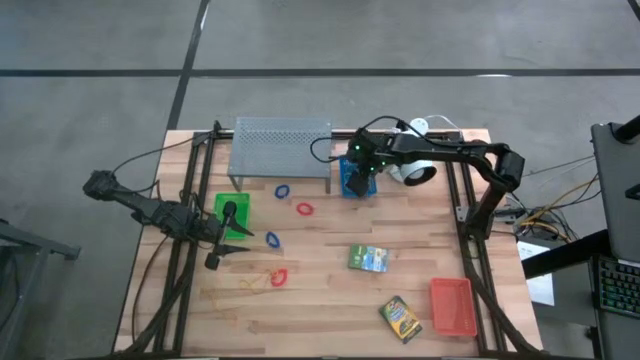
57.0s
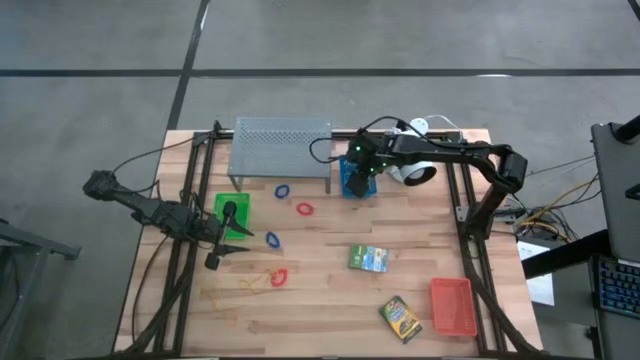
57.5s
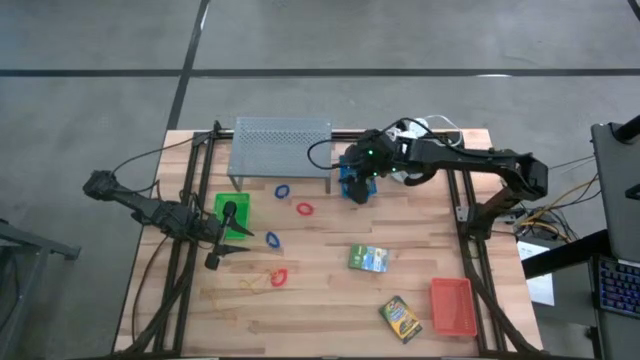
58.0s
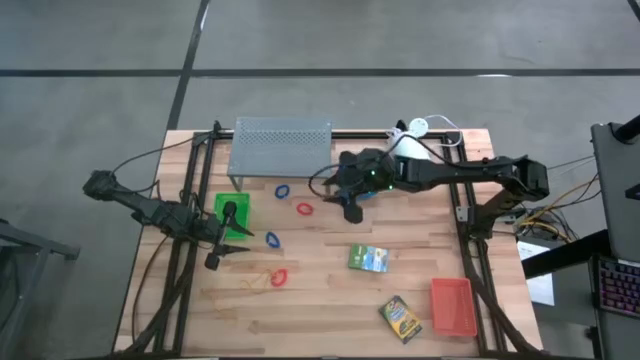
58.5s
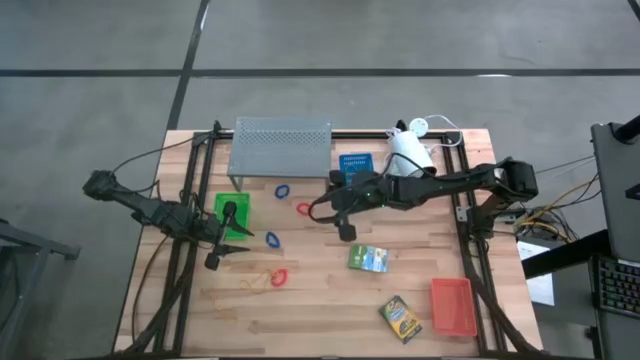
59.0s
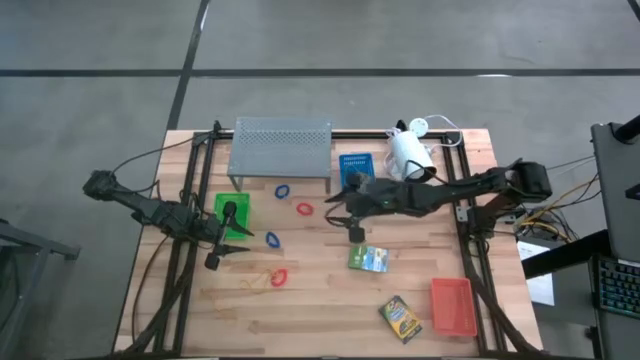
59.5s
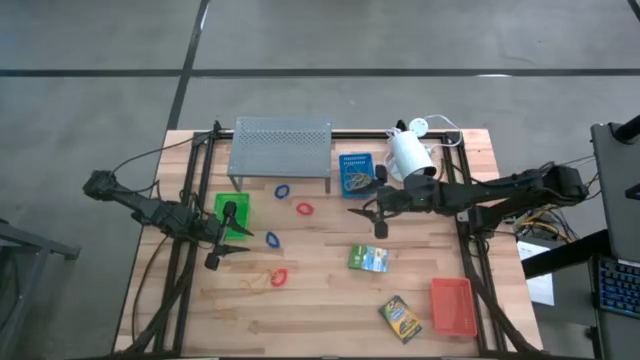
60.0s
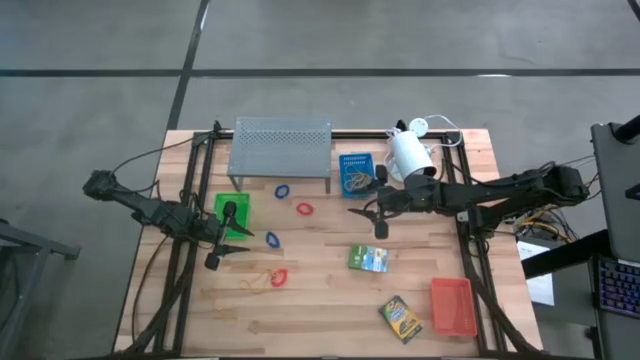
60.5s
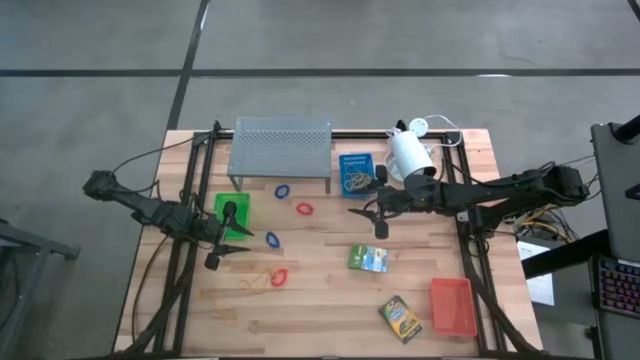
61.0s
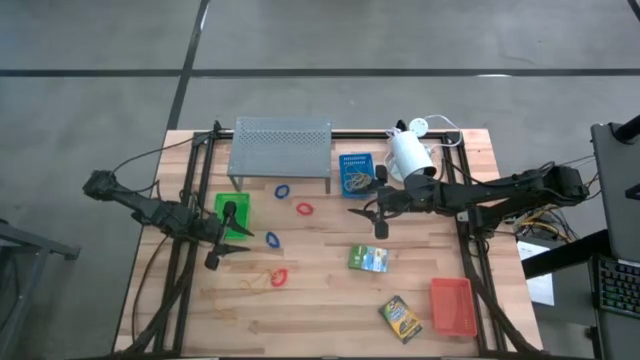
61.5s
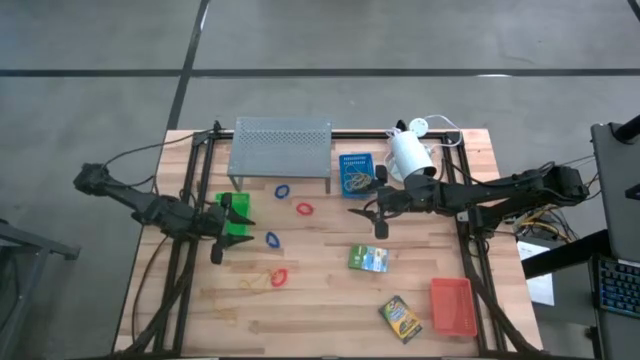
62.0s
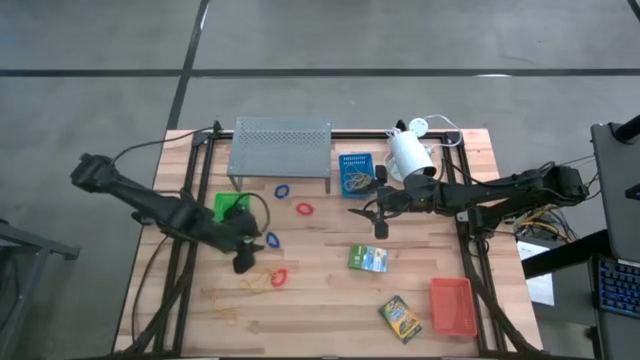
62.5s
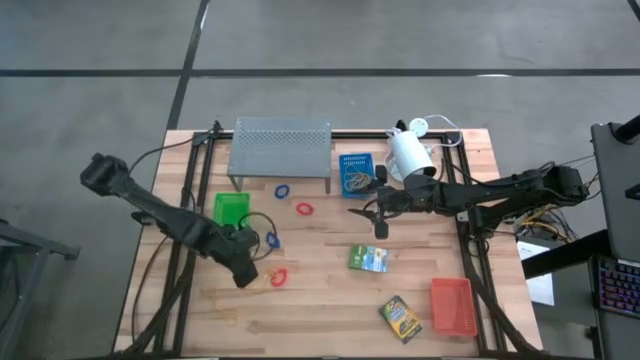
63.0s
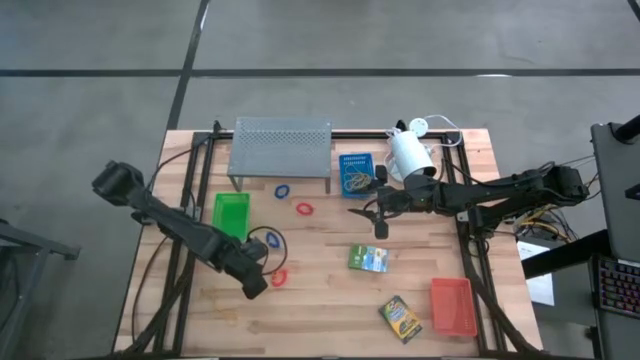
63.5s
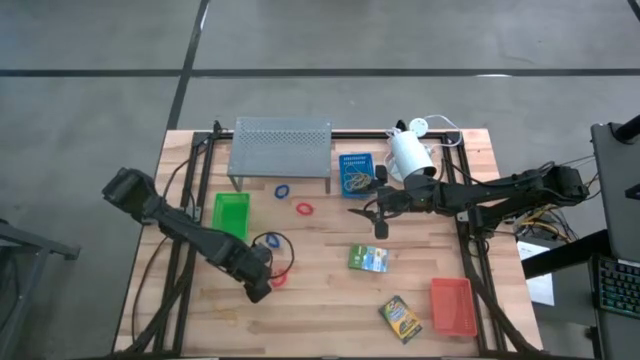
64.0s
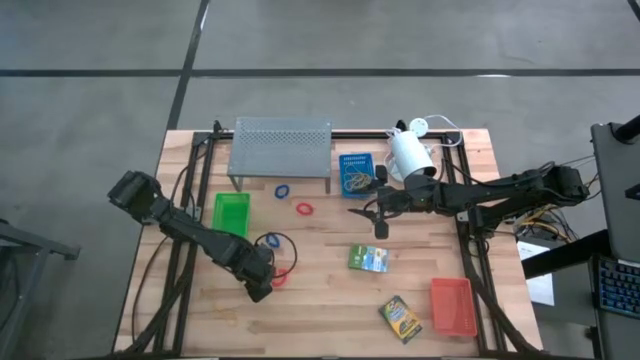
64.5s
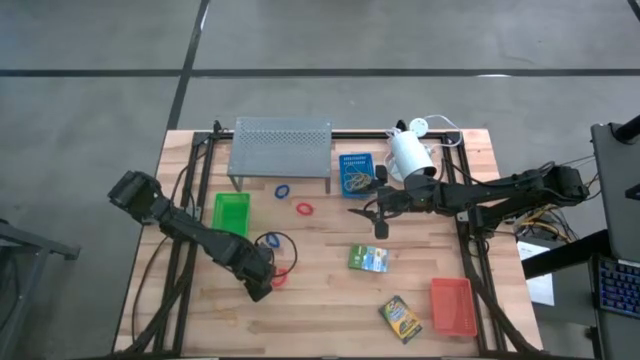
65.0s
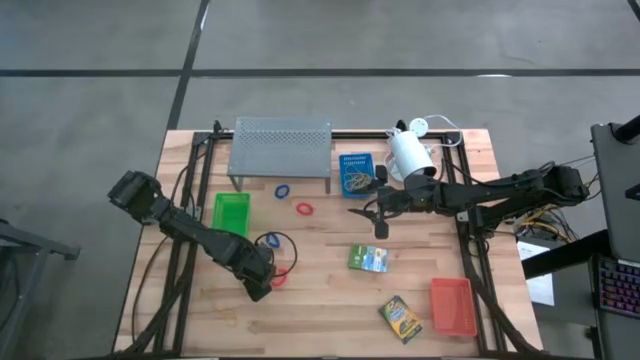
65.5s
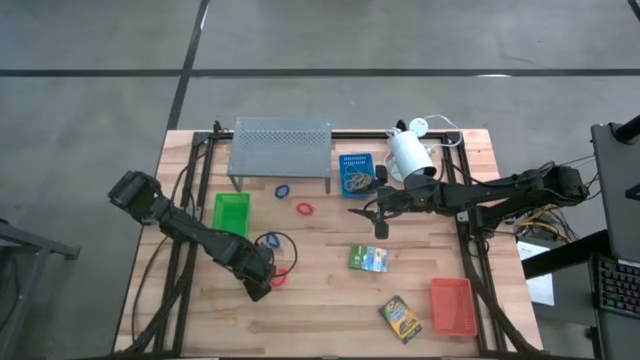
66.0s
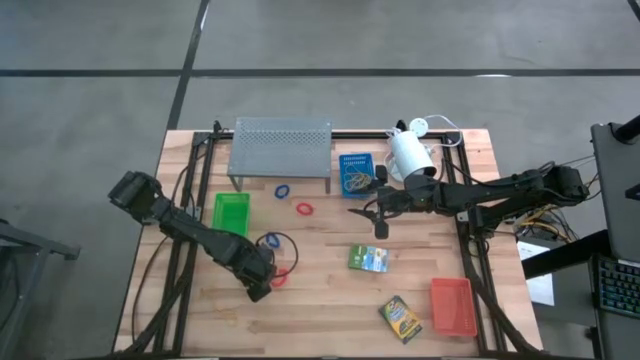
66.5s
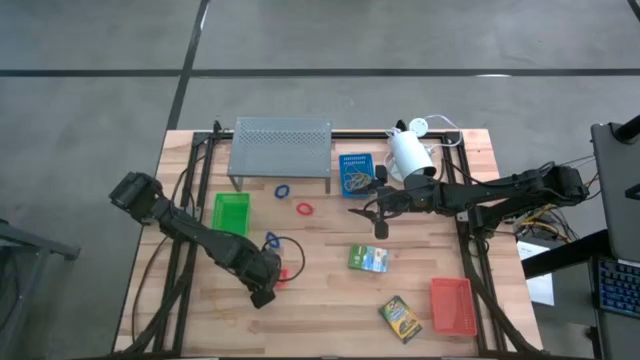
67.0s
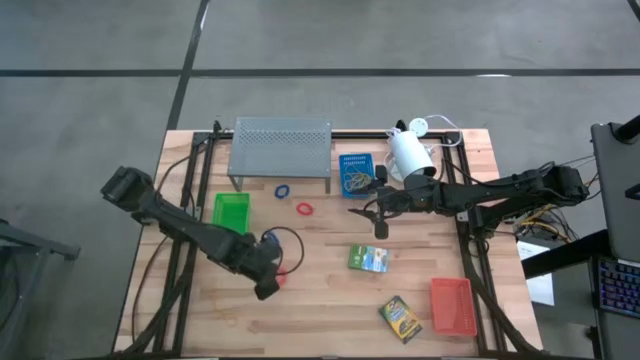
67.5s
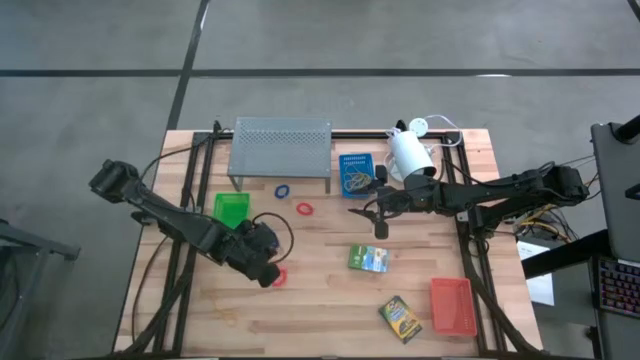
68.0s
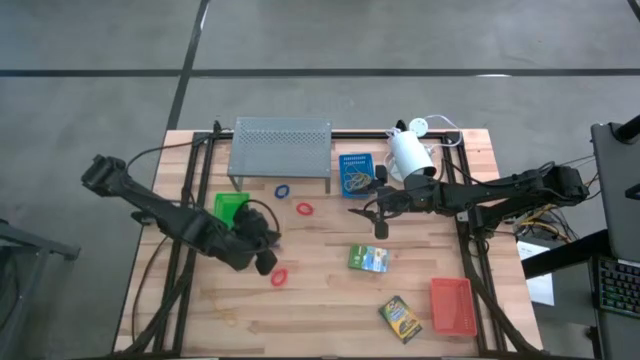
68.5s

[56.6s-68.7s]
Task: Pick & Place Office Desk Supplies
Put the yellow rubber band into the blue bin

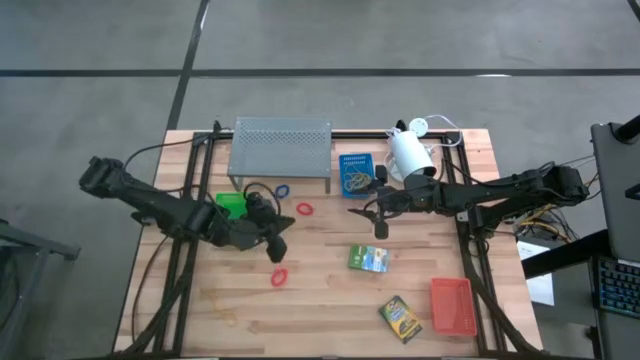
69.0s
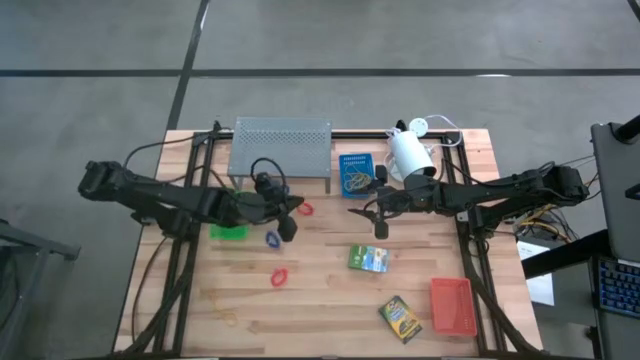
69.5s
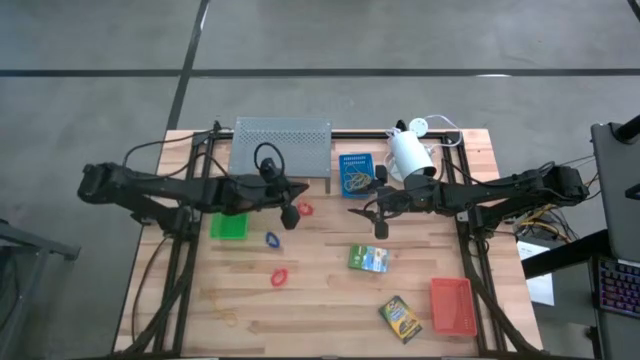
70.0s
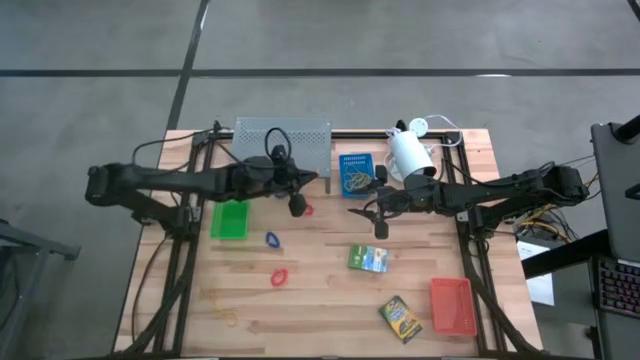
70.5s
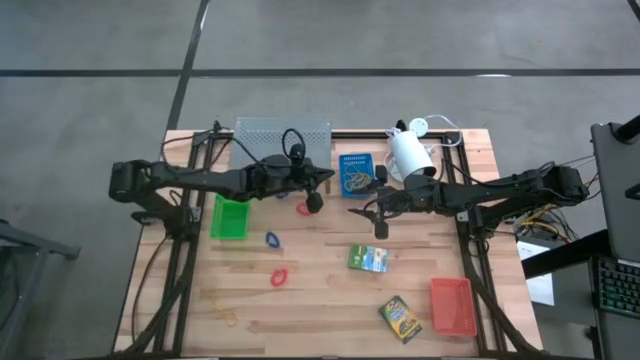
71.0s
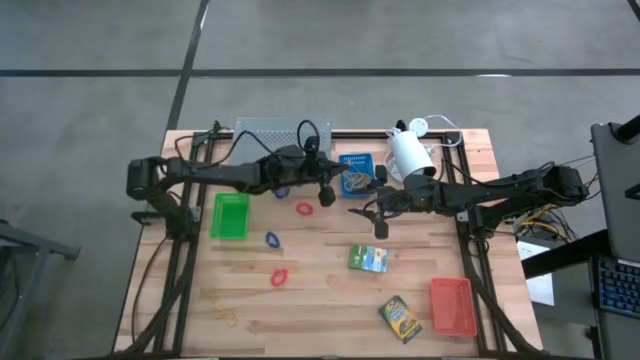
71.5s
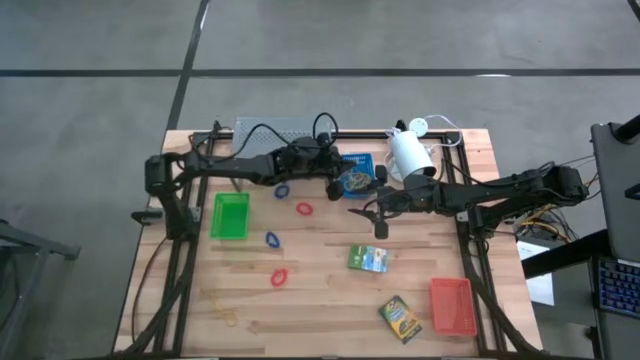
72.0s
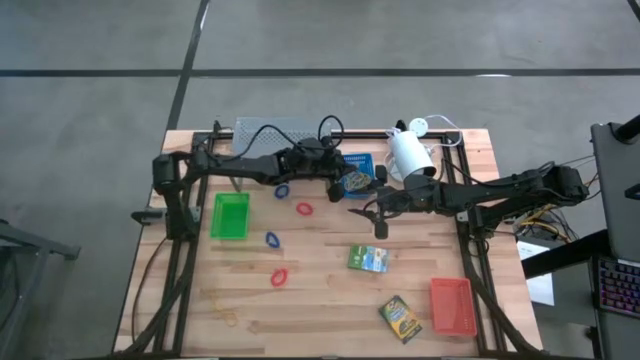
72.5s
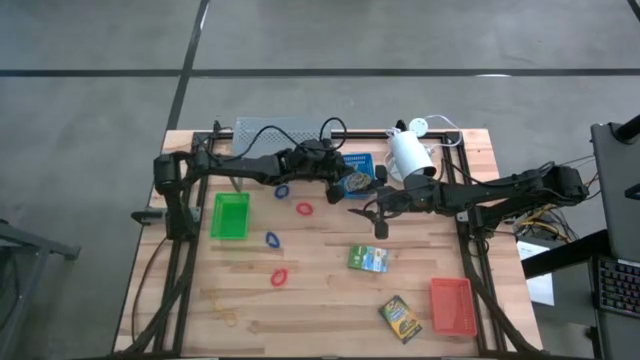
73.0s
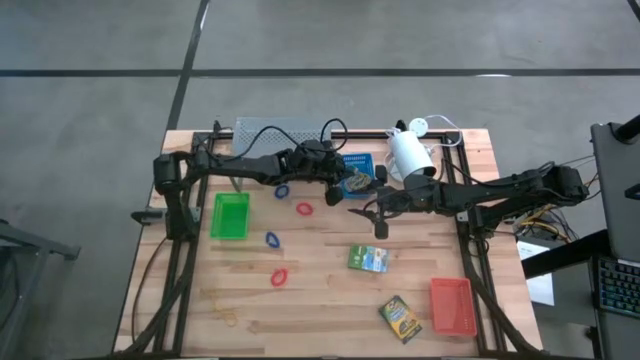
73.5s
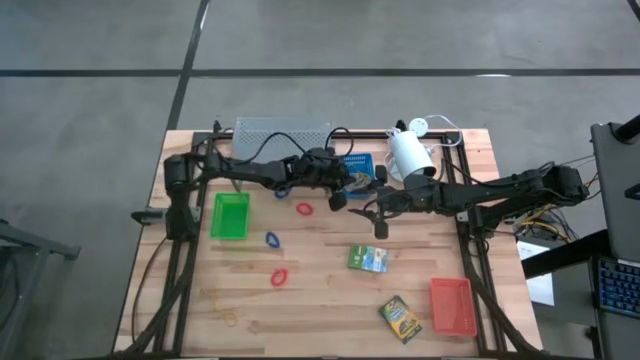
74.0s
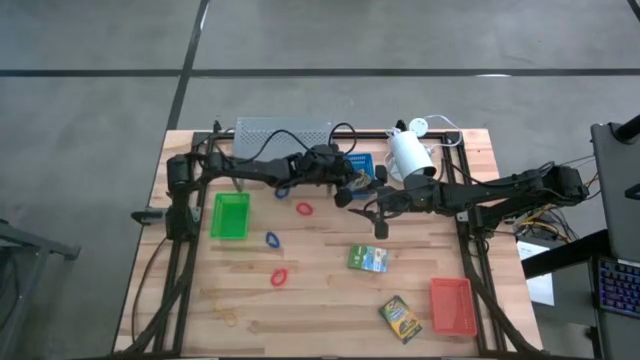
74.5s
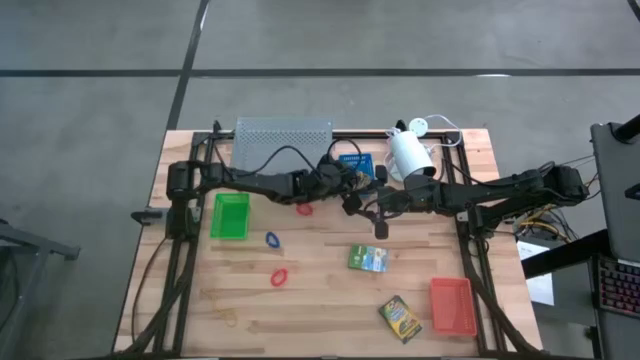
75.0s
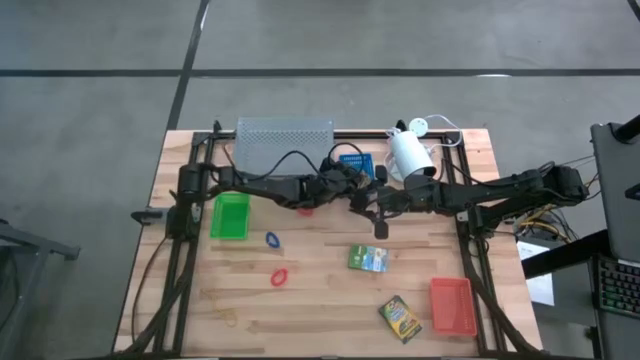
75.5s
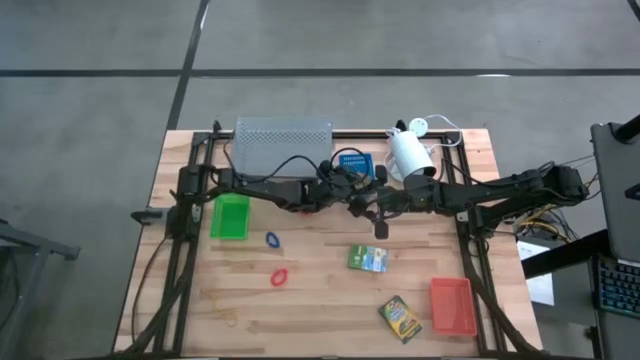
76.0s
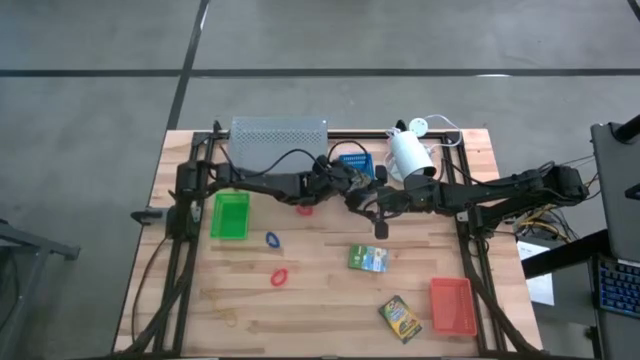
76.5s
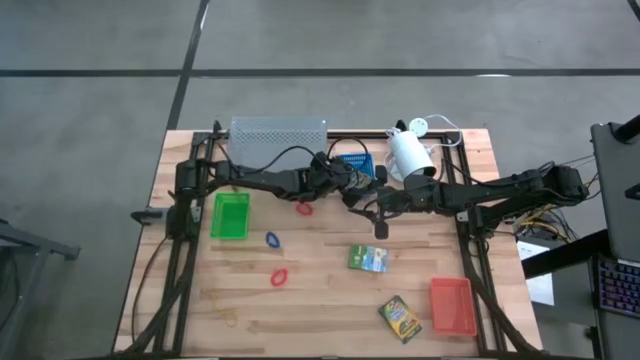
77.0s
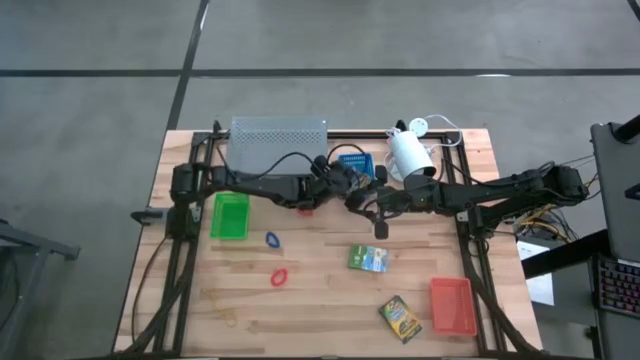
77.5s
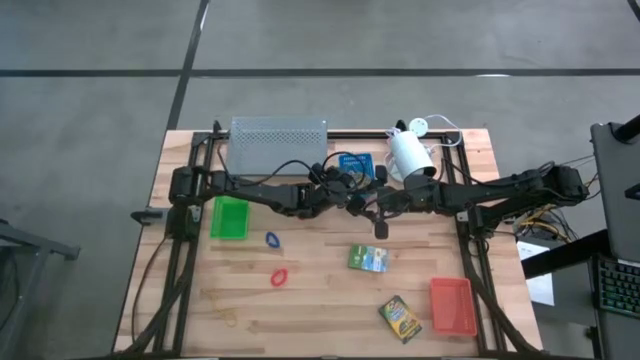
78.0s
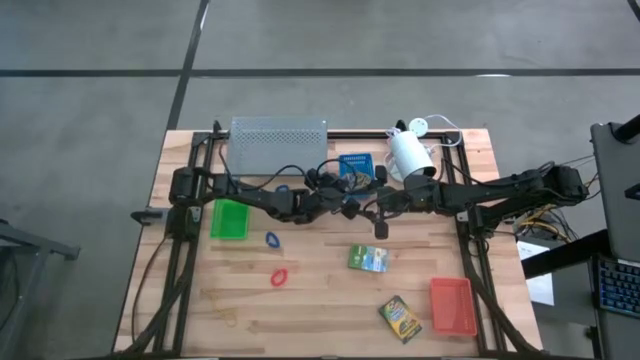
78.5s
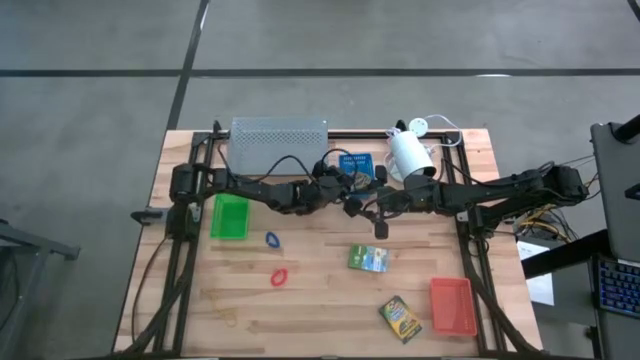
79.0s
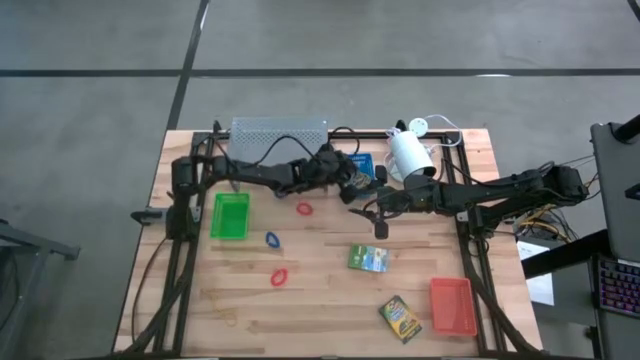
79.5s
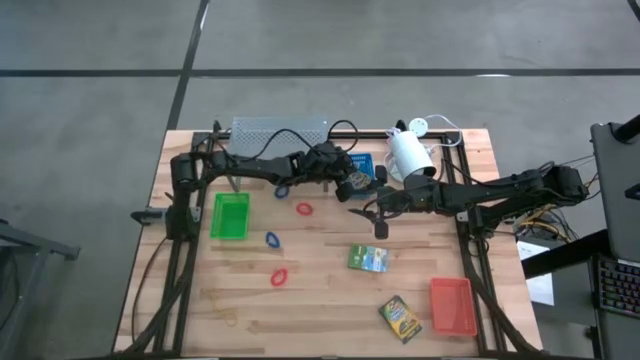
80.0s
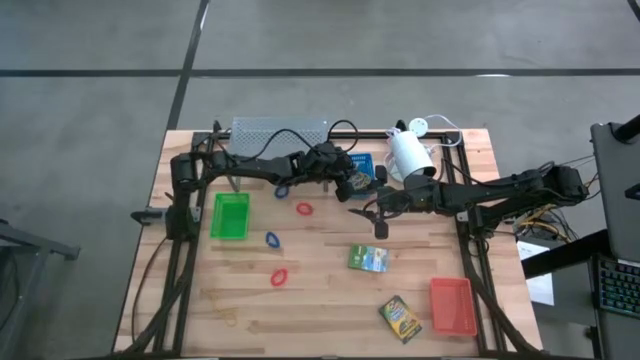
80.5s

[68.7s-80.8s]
Put the yellow rubber band into the blue bin
